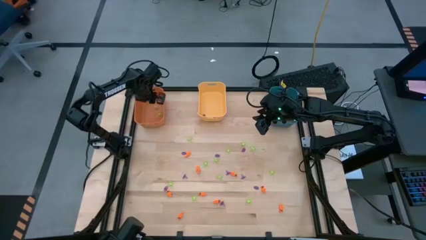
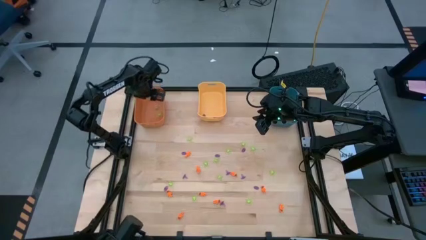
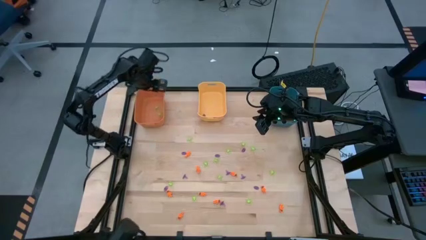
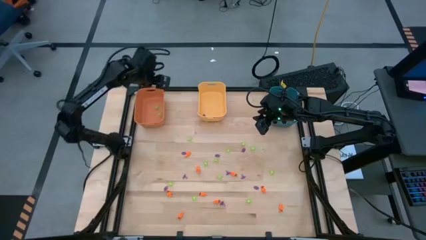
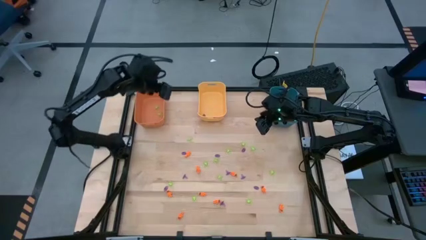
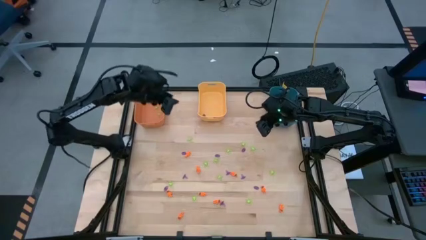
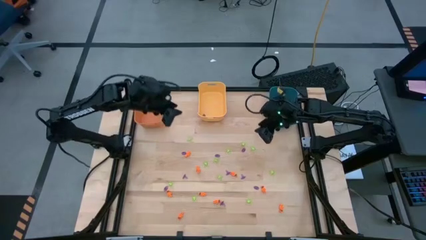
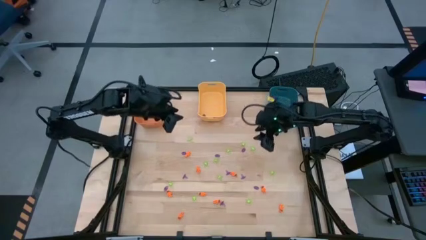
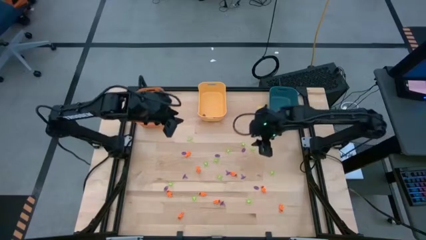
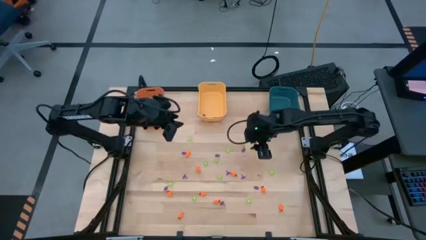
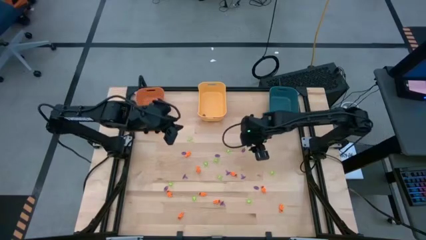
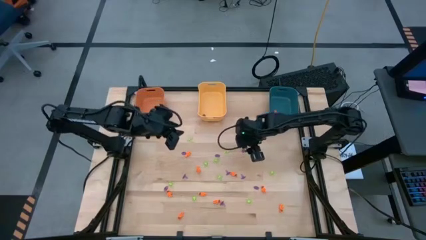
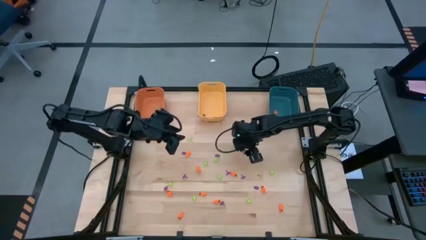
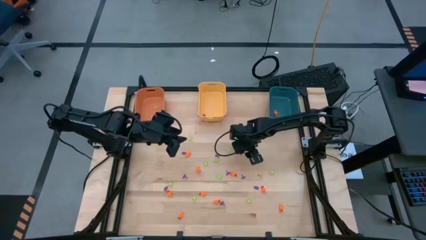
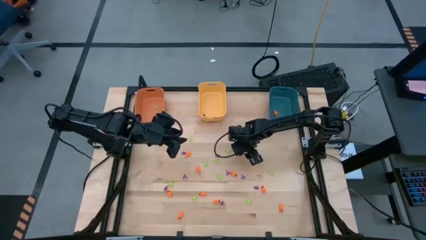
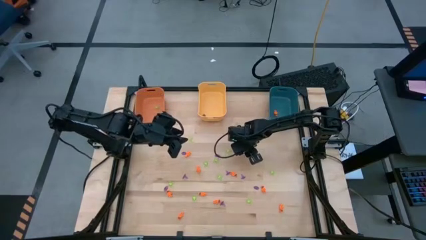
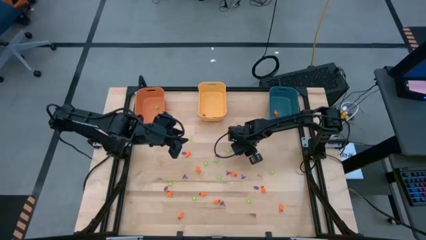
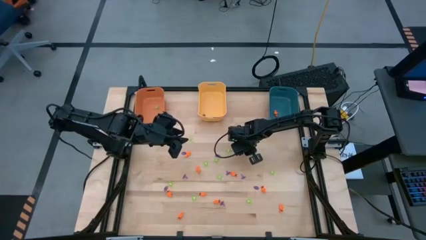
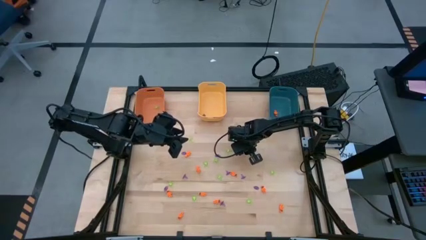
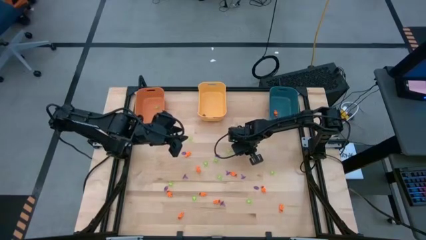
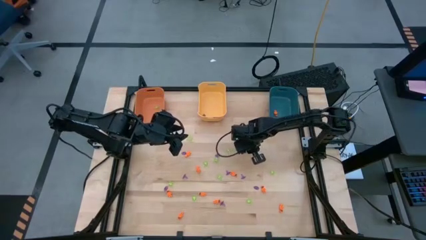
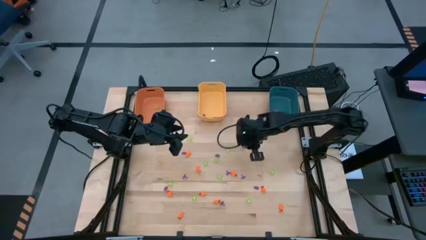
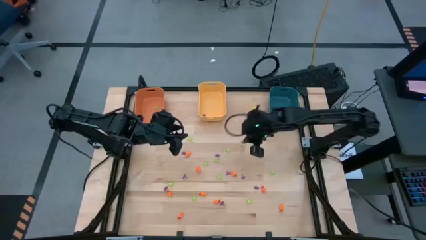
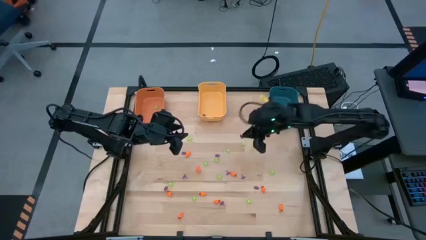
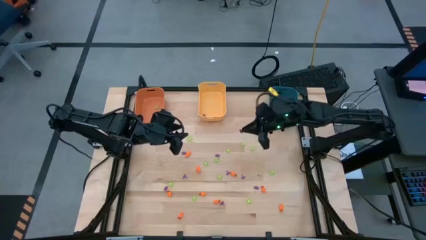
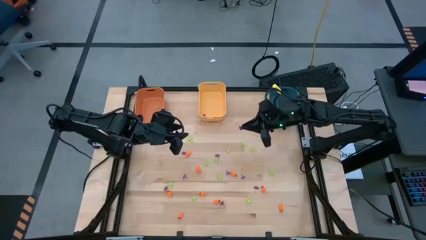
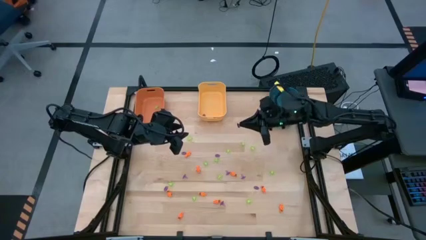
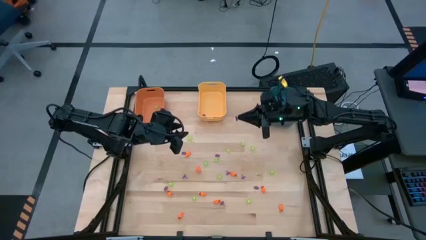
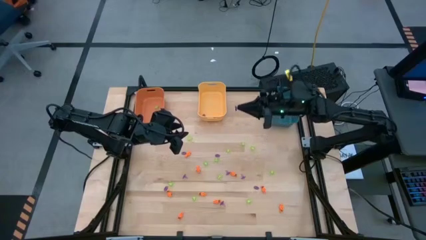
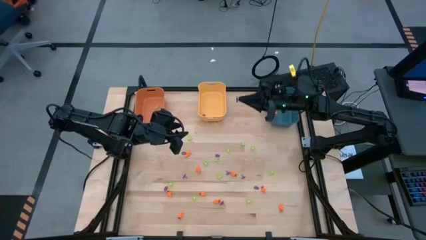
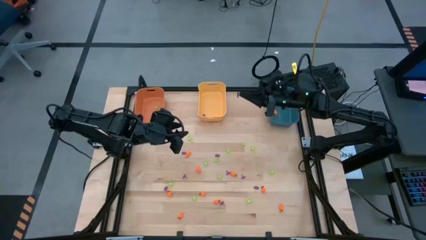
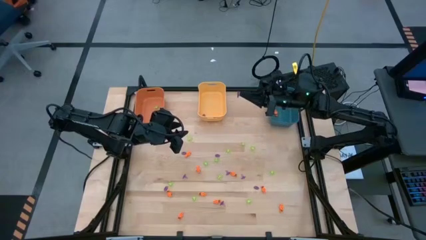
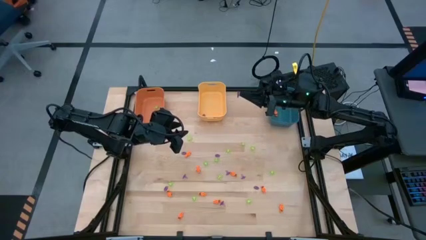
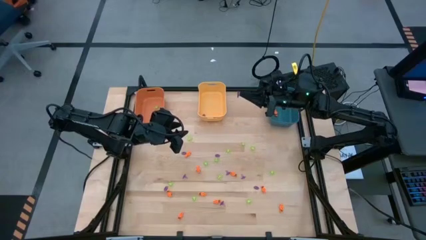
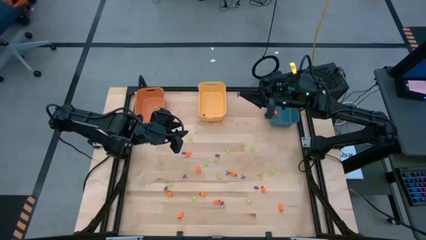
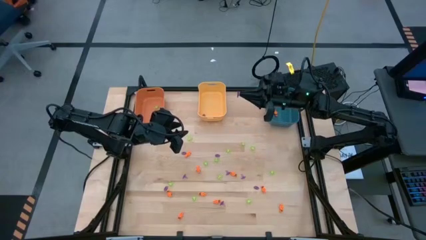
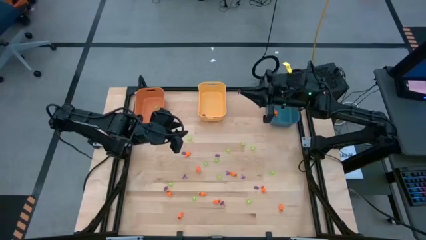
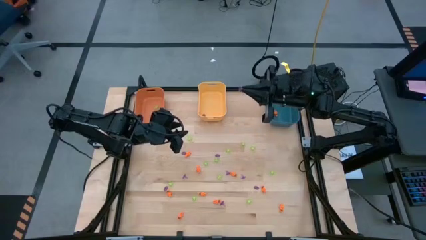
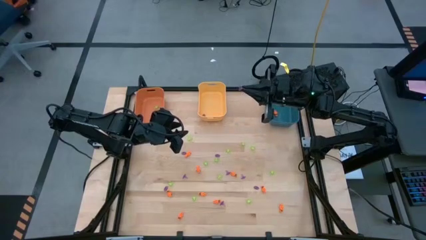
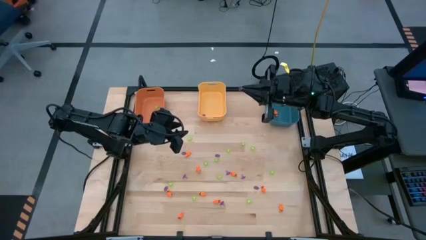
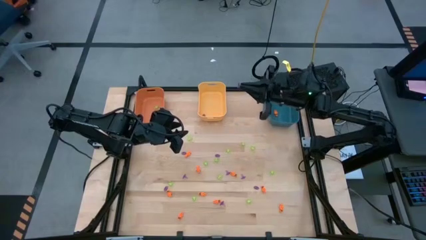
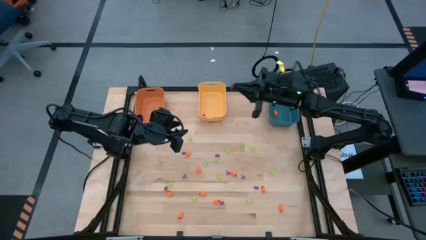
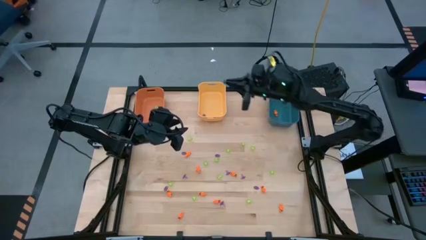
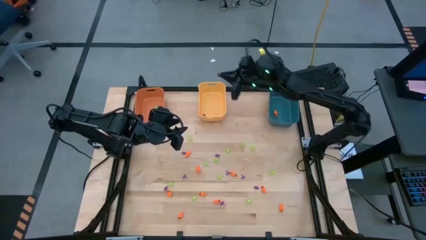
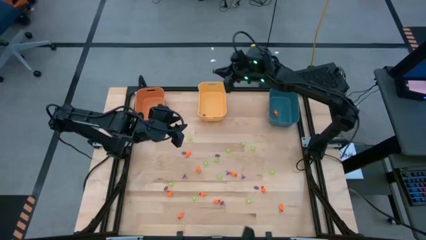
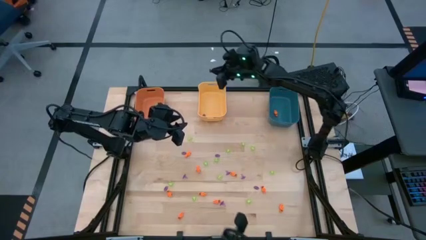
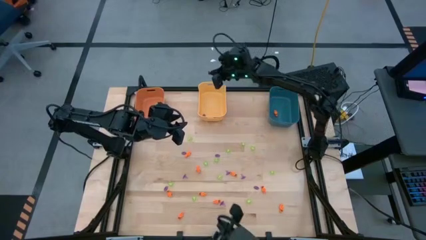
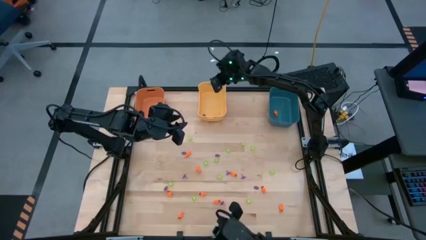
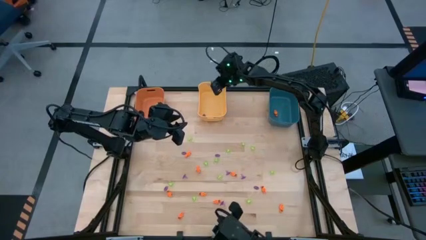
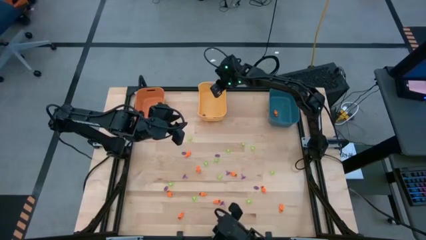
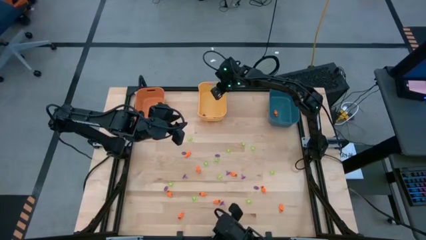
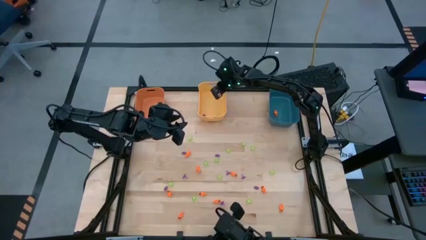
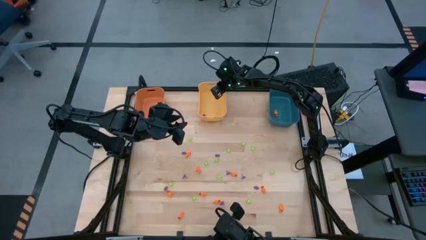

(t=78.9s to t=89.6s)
Task: Sort Halloween decoration
Put the purple witch hat toy into the yellow bin

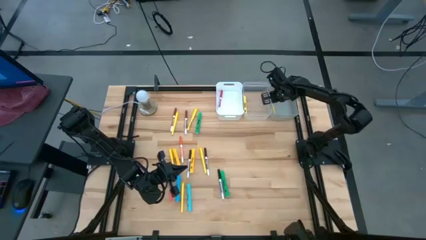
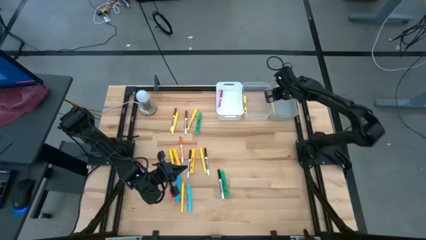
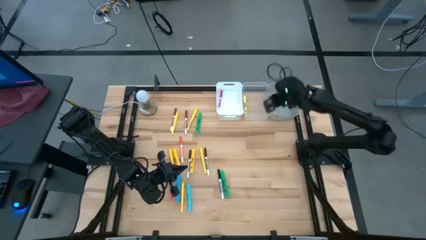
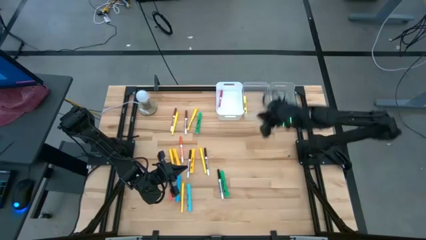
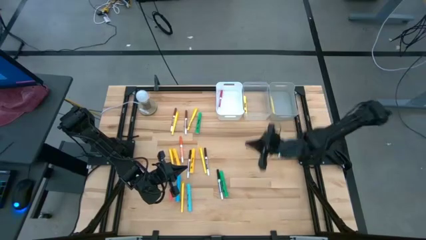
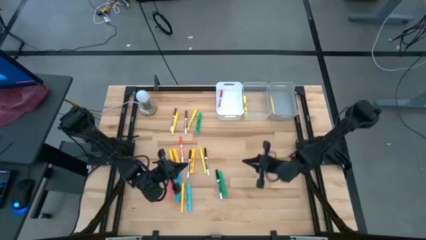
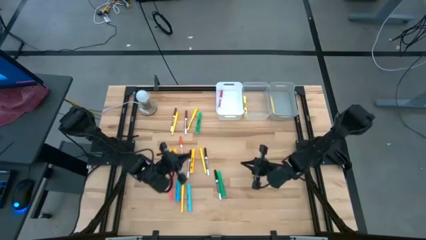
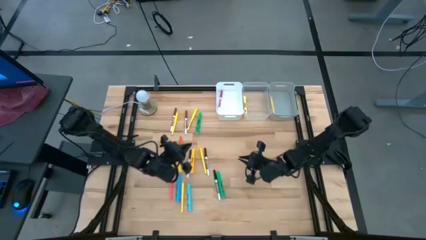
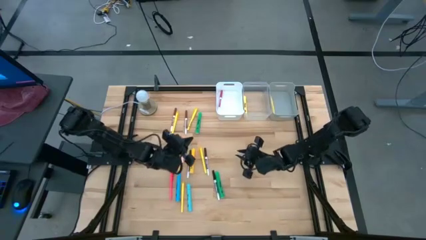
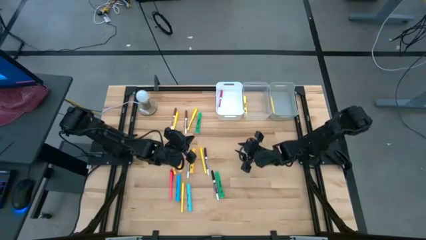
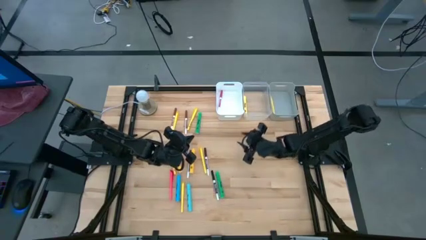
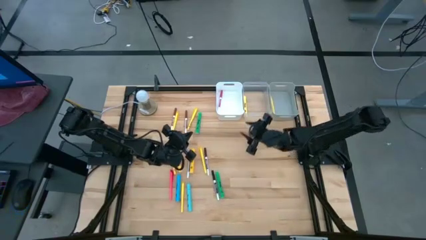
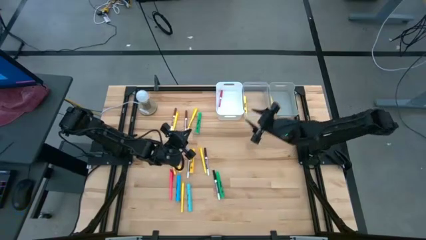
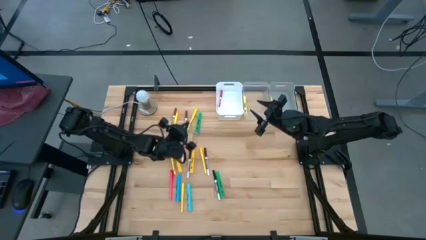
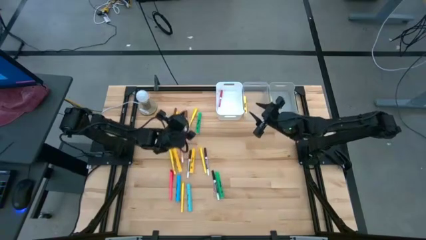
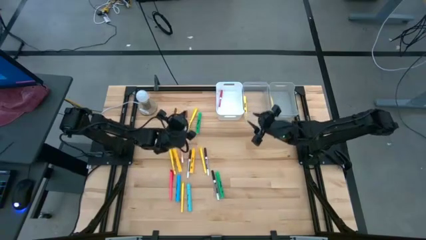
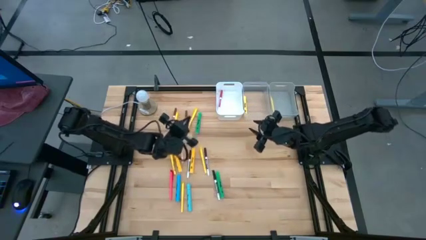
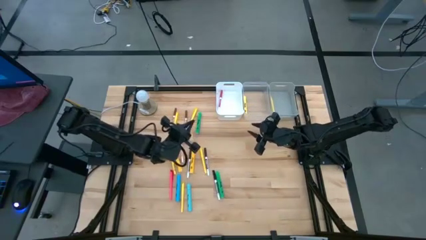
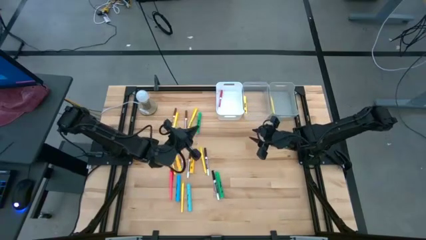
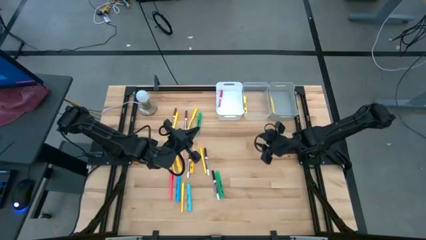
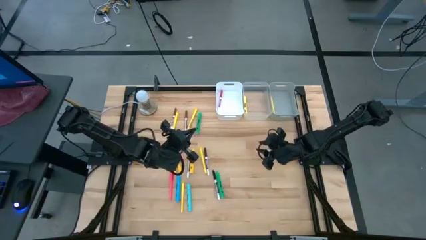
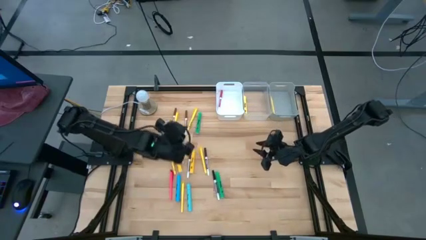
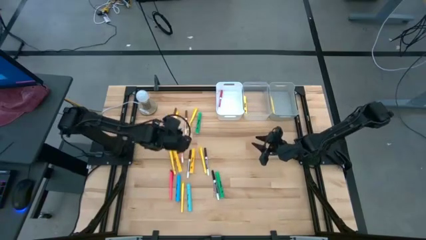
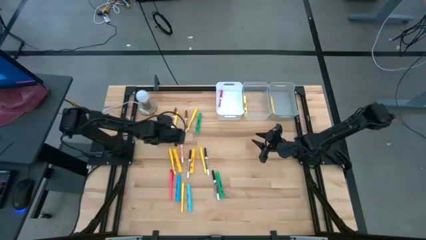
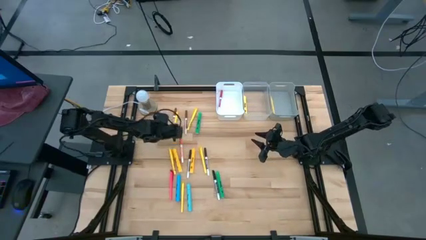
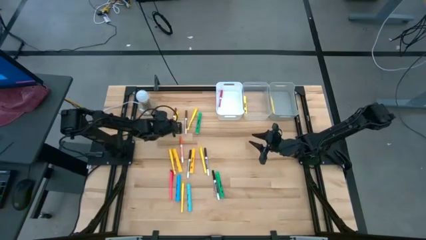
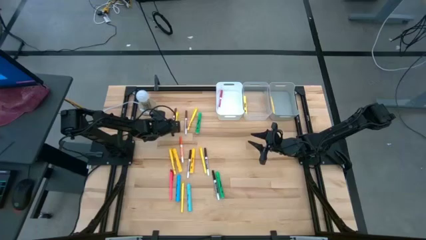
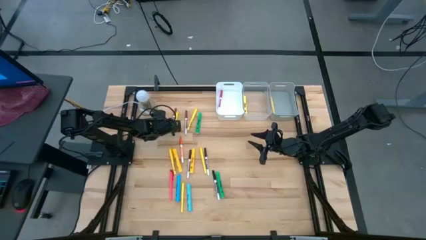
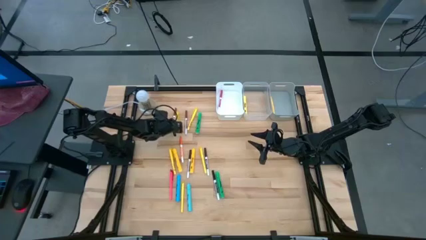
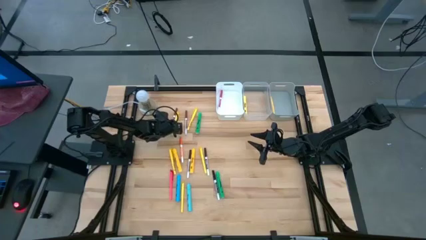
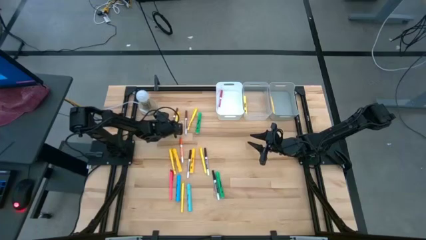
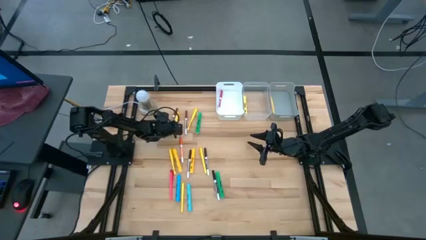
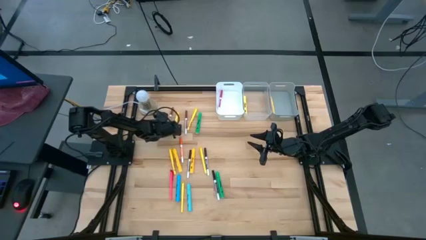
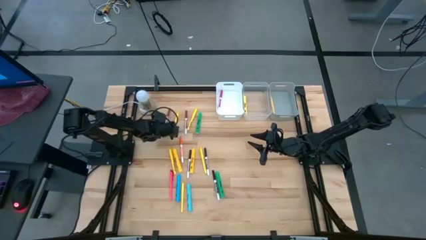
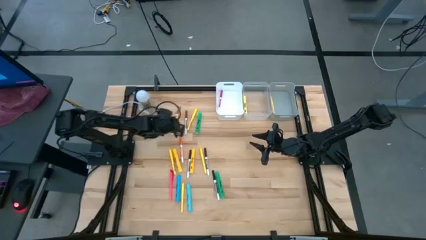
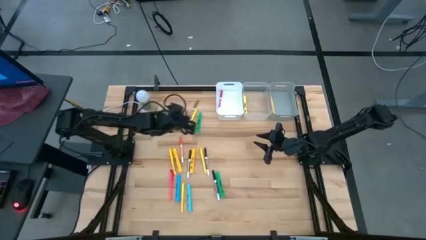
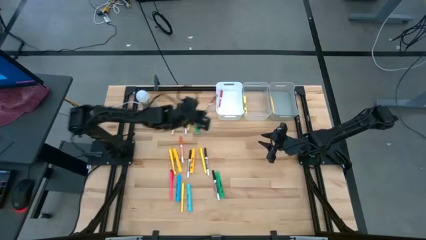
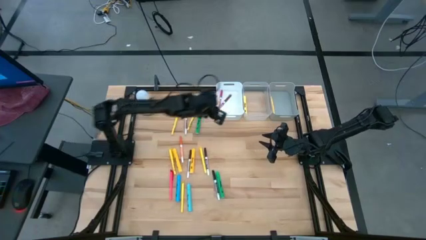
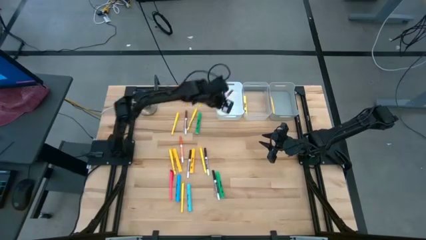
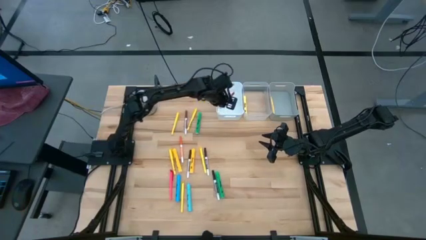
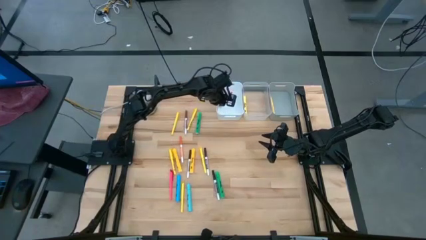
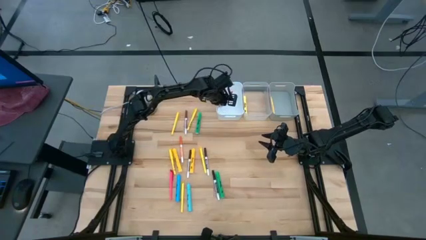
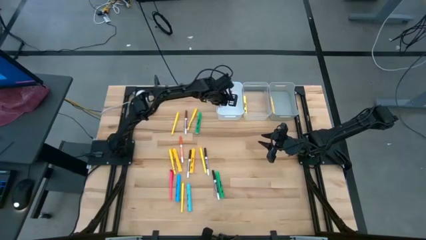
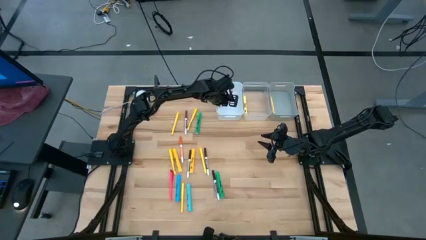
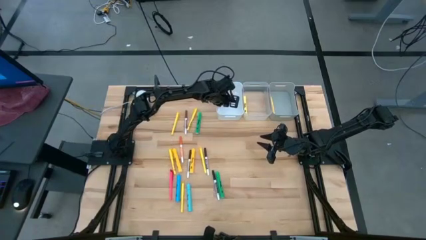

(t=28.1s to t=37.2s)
Task: Pick & Place Markers
Put the left light brown marker pen into the white bin
